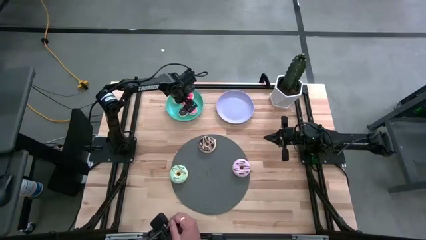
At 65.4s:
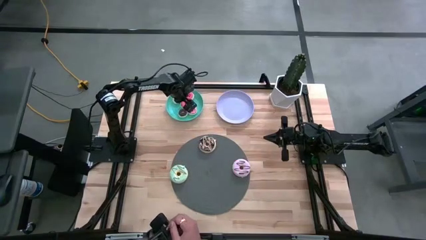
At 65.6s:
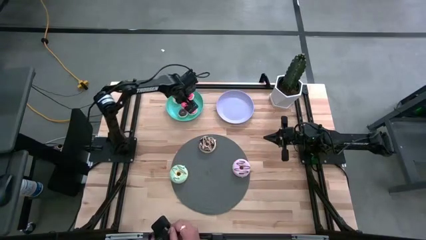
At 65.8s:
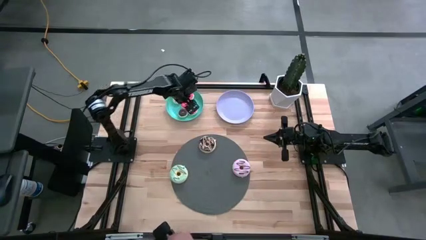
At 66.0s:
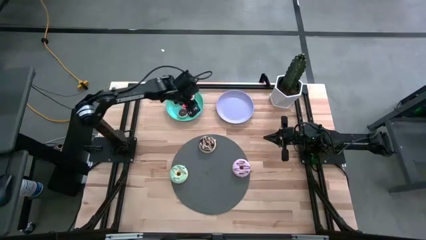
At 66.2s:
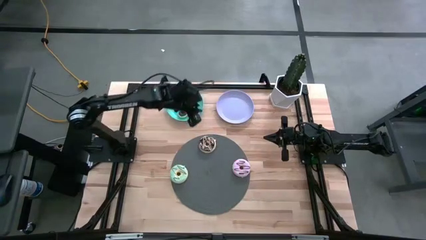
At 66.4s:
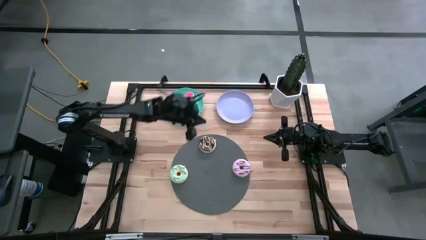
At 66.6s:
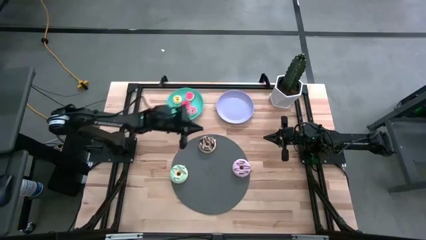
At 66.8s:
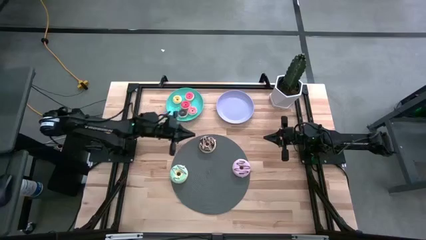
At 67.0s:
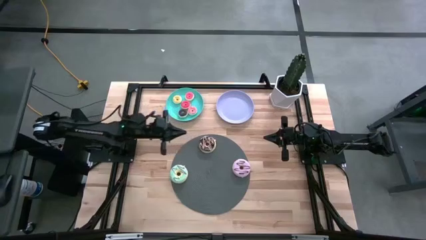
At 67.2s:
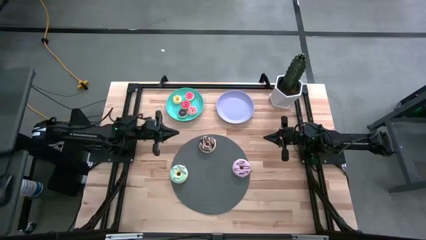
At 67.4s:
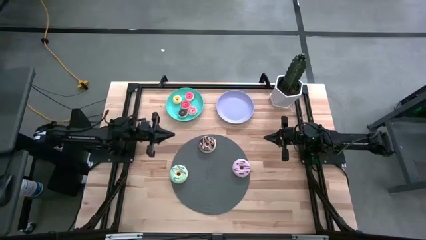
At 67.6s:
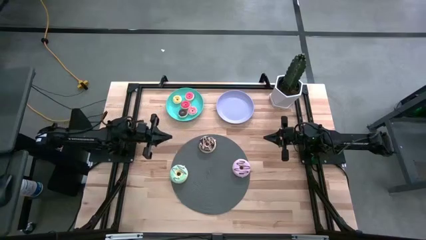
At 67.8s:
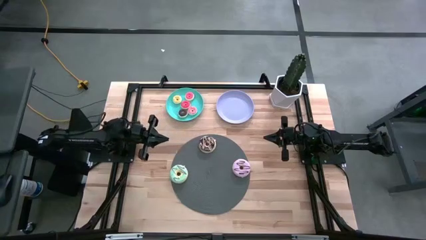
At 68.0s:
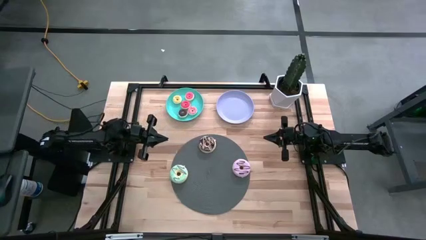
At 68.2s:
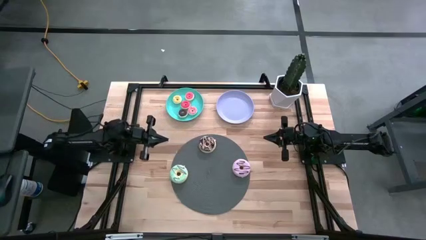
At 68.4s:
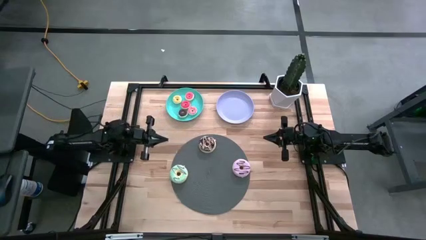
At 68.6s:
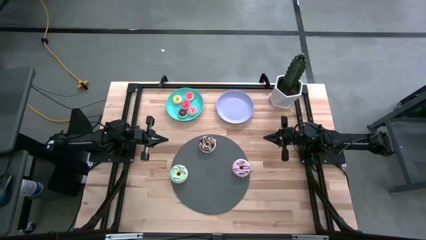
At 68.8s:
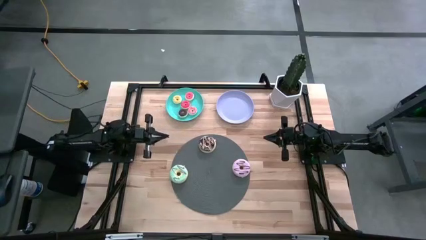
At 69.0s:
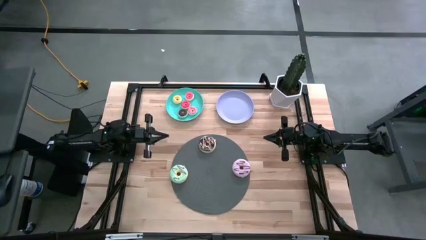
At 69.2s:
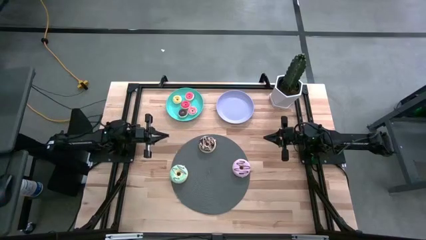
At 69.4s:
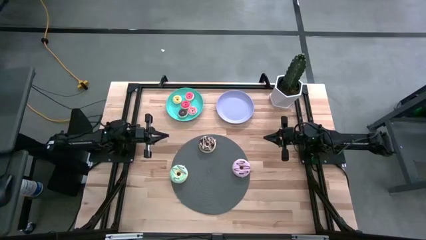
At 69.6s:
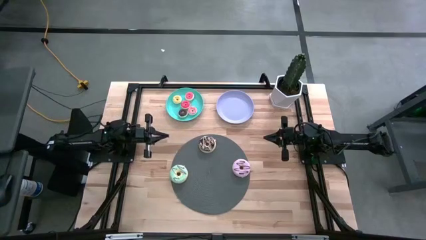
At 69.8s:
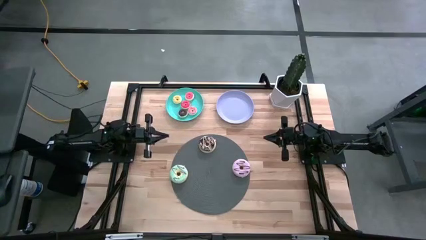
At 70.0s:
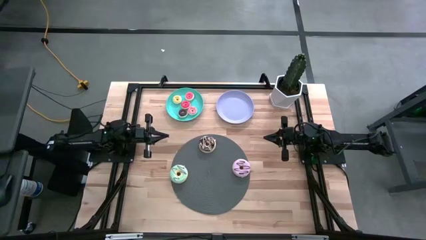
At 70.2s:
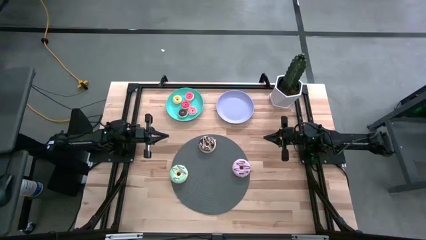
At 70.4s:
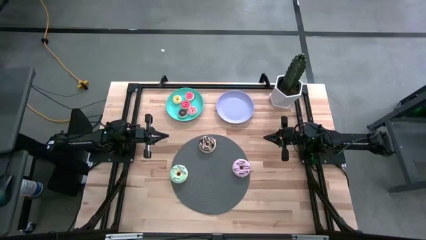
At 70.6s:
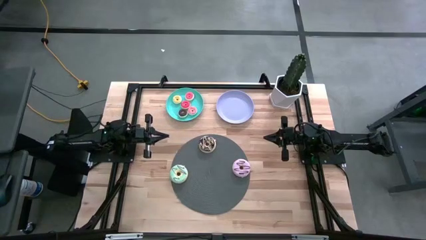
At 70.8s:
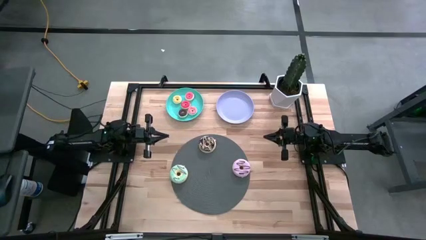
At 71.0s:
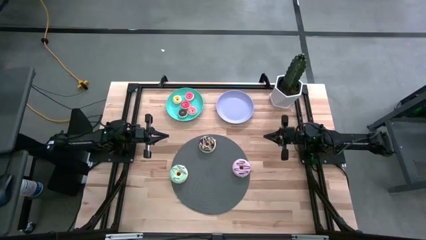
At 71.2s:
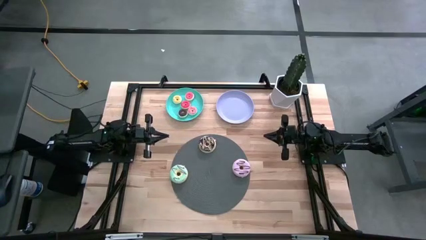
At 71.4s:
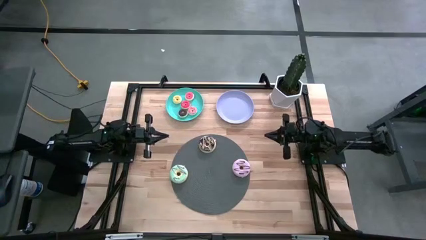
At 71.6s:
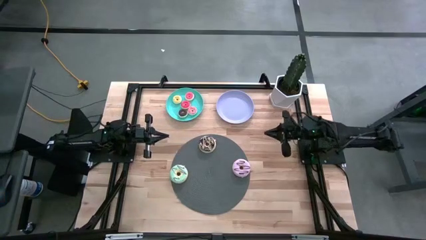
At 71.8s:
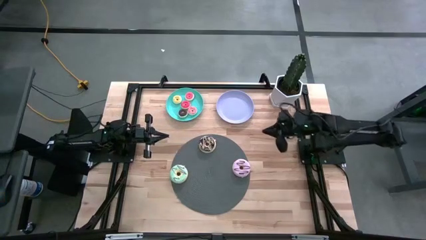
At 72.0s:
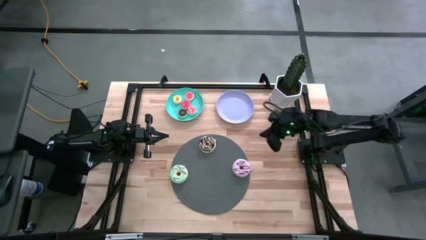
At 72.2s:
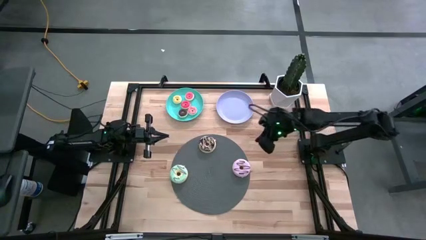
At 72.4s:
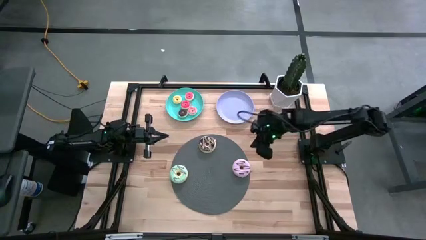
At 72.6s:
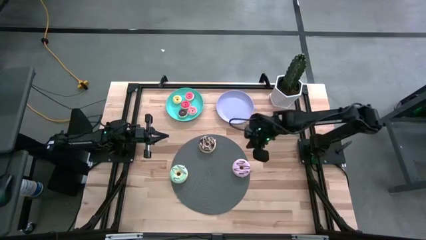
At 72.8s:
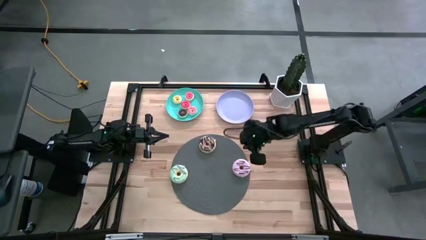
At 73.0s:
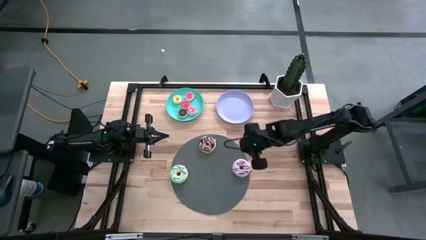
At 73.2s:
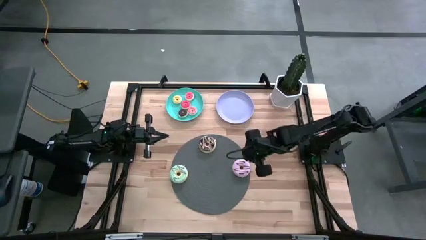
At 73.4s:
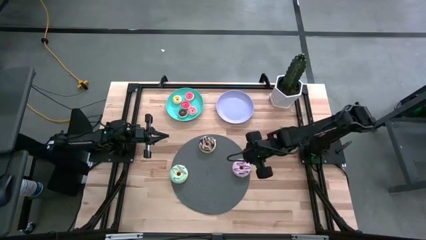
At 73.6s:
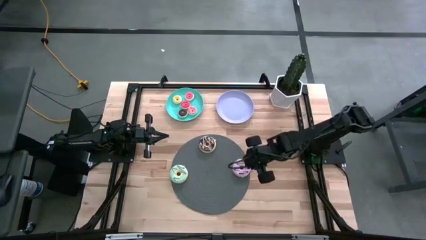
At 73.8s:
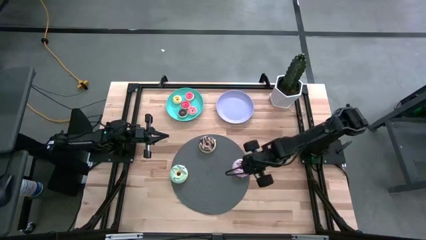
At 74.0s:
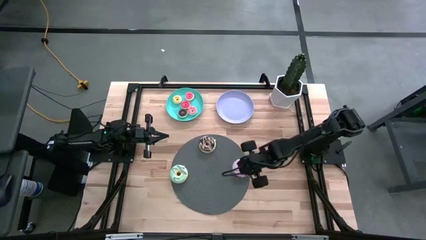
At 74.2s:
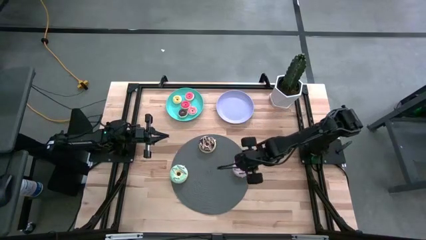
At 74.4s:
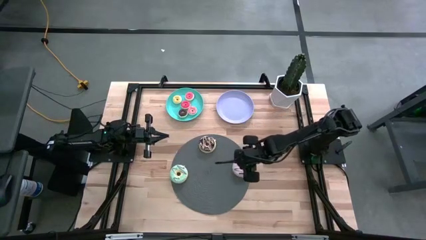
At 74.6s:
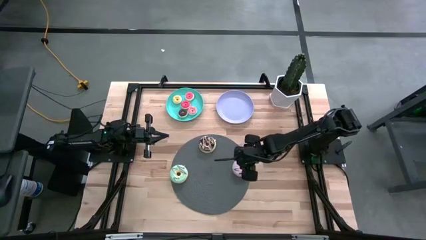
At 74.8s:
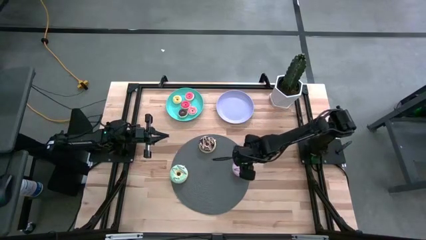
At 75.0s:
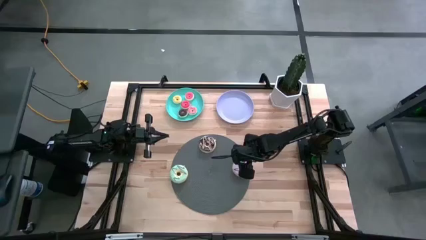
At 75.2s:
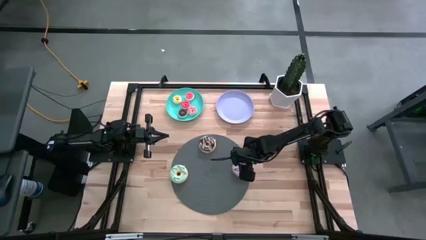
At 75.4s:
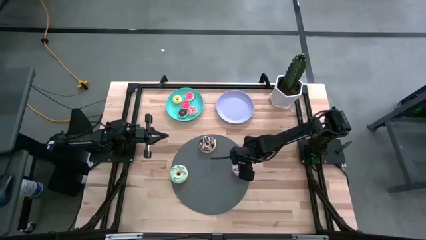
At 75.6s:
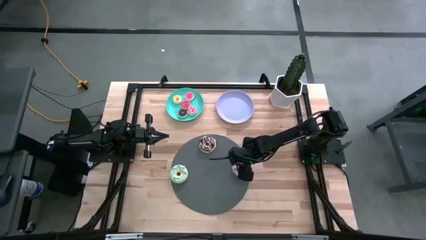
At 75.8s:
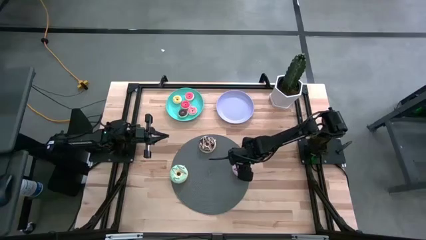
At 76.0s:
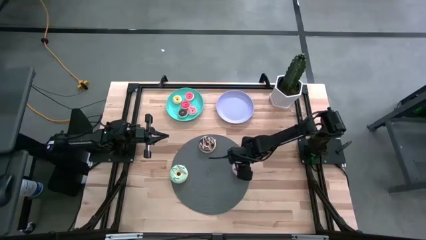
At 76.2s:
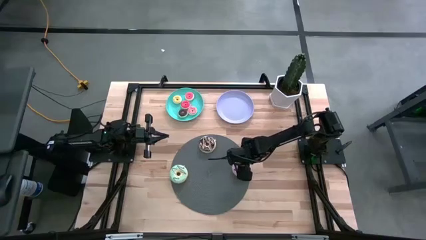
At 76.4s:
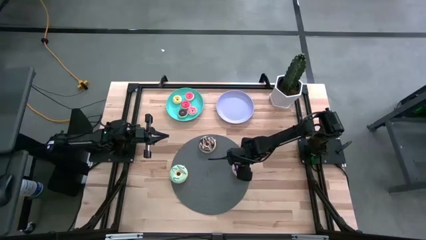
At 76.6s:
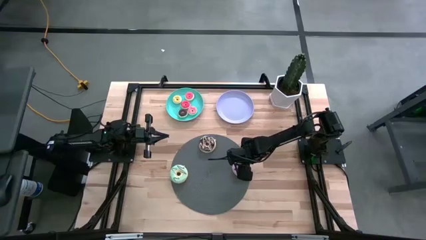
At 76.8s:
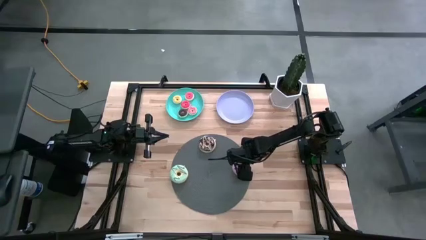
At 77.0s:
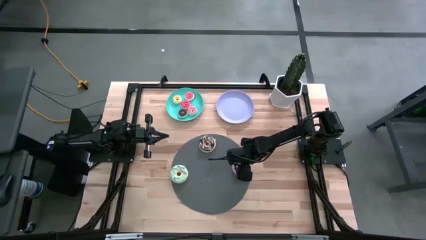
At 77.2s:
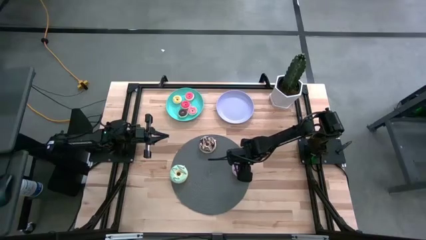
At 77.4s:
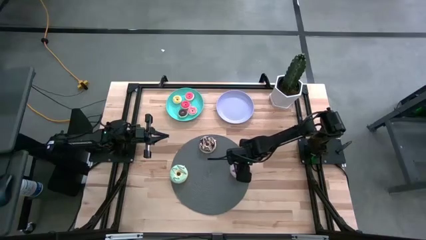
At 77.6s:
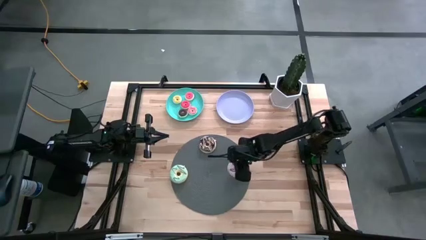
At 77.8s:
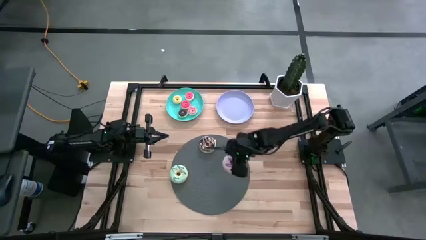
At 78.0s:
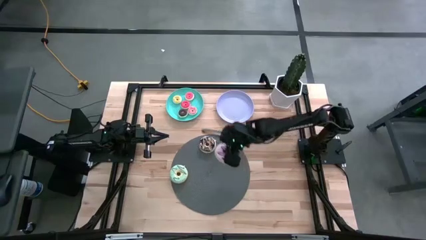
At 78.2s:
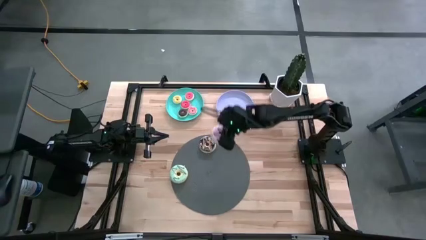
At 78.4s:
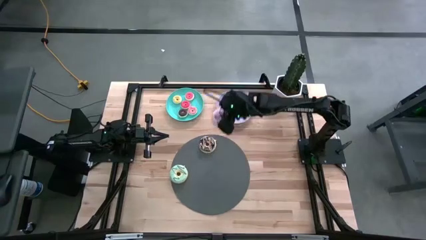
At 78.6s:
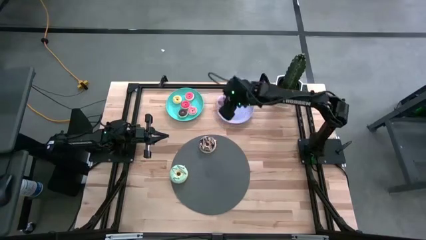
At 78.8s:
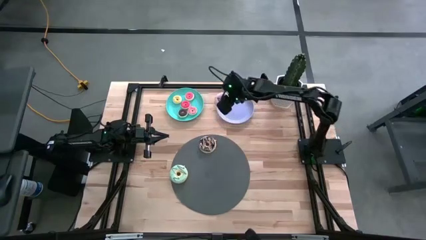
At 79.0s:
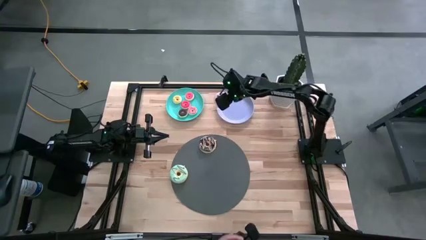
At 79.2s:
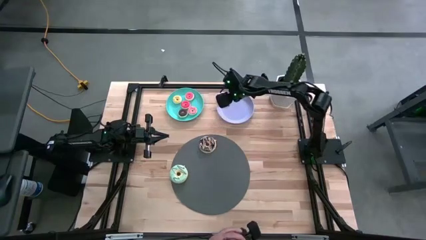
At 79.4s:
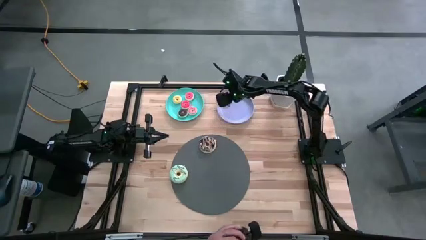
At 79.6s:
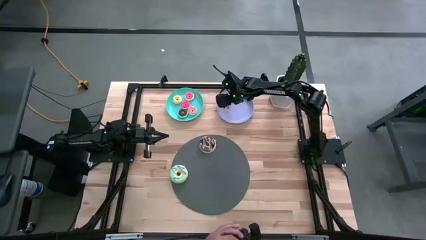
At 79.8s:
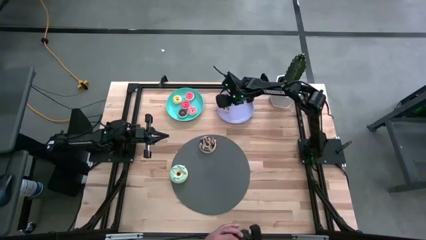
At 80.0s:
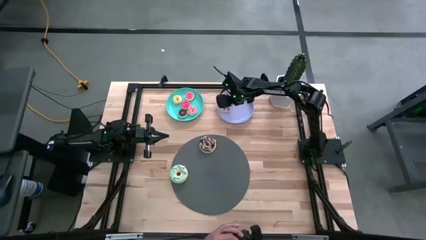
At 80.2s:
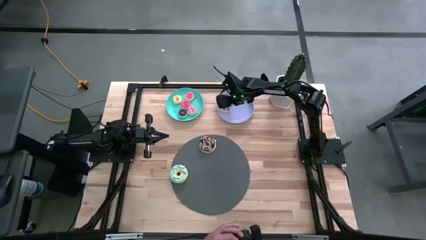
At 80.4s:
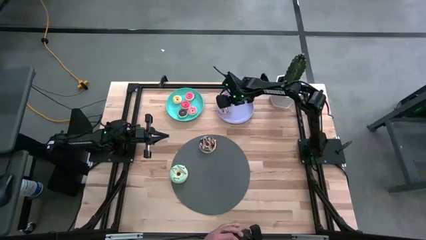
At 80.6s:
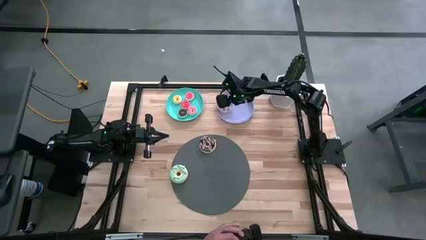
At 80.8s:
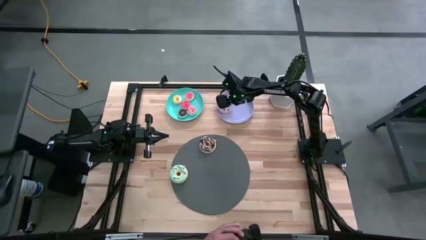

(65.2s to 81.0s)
Task: Pick & Place donuts
Put the large purple donut on the purple plate

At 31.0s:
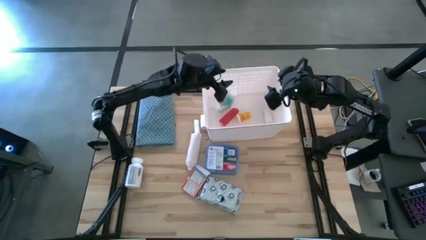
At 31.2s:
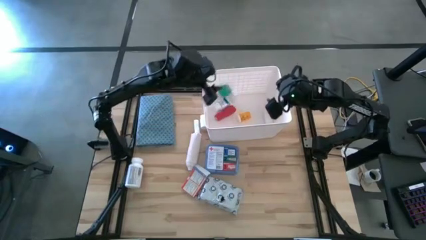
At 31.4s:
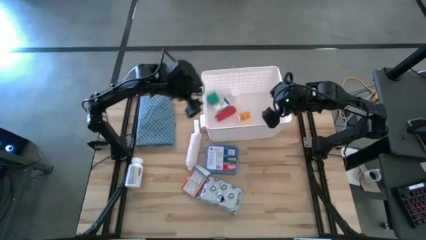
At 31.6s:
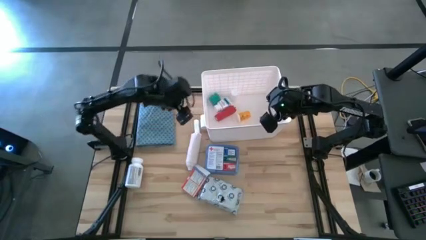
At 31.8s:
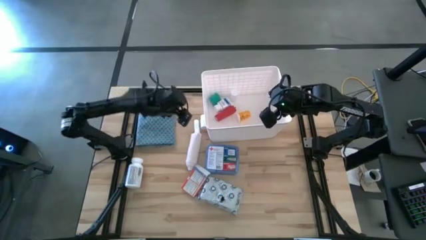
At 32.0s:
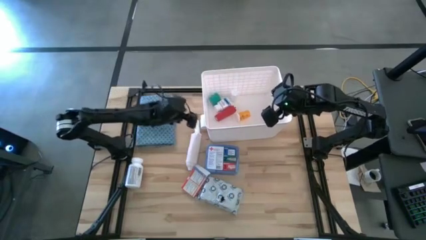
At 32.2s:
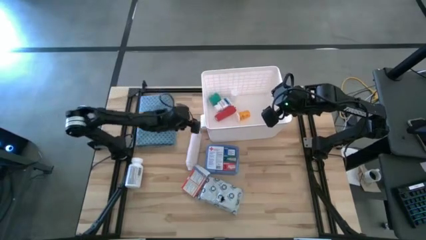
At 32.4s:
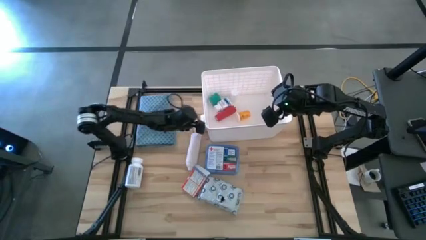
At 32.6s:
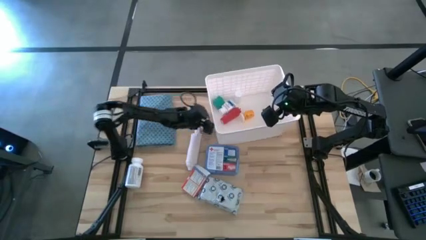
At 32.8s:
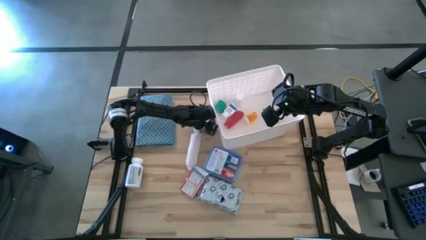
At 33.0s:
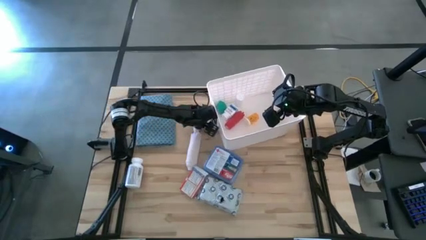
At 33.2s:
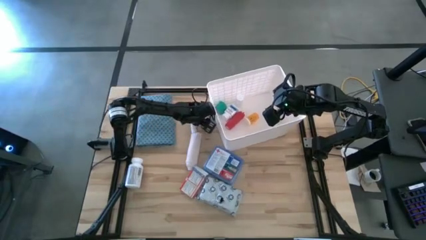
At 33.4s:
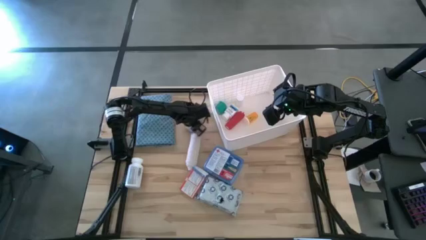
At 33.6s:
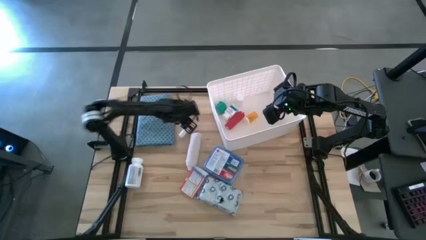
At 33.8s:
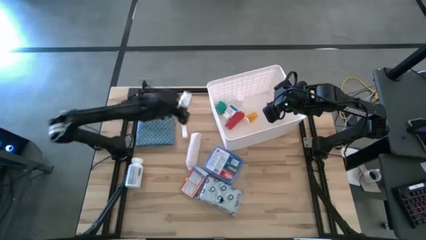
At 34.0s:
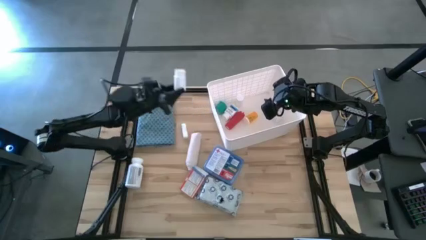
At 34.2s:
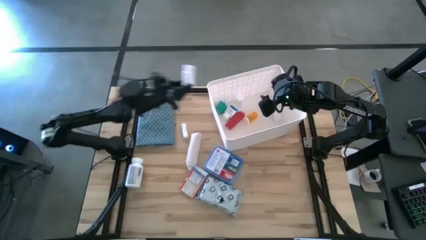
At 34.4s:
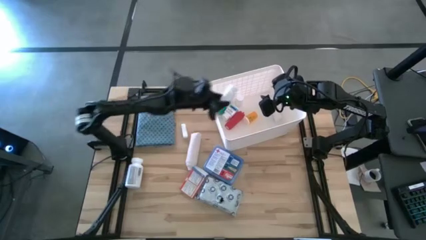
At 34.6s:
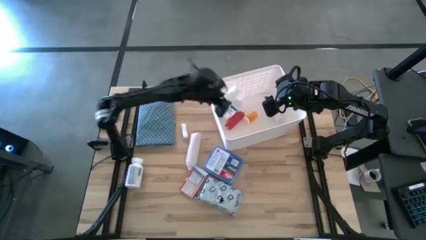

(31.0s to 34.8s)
Task: Pick & place medical supplies in basket/bin
Put the white pill bottle into the white bin
